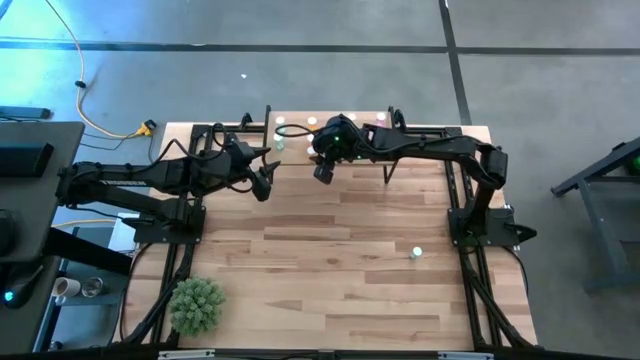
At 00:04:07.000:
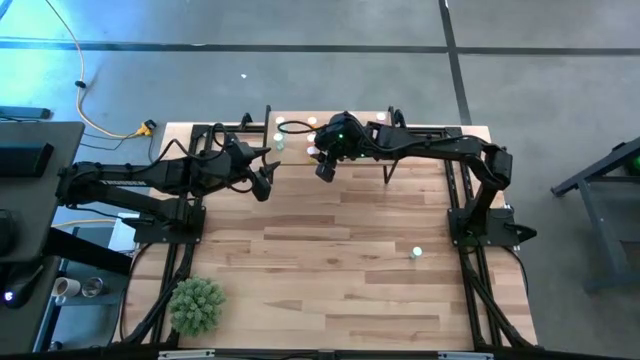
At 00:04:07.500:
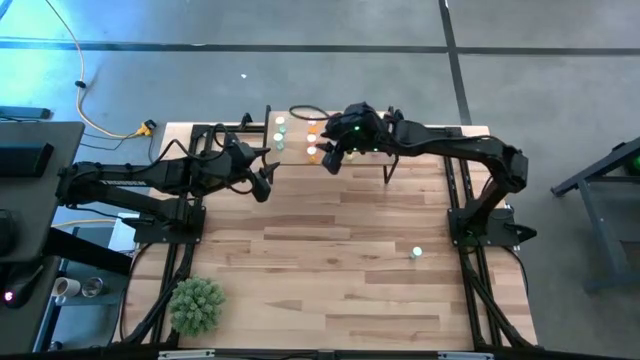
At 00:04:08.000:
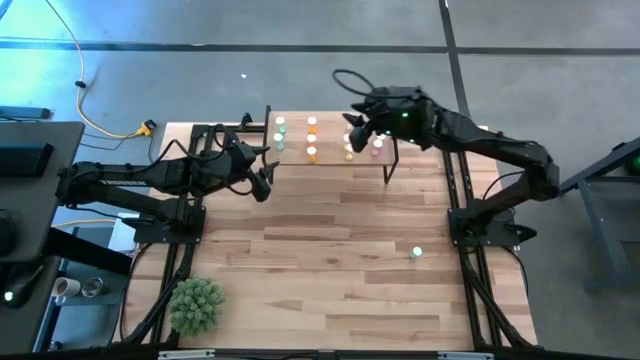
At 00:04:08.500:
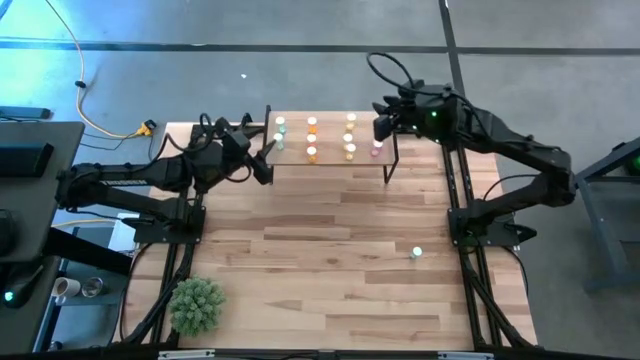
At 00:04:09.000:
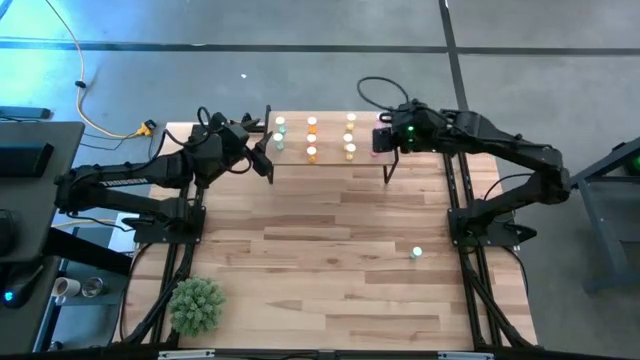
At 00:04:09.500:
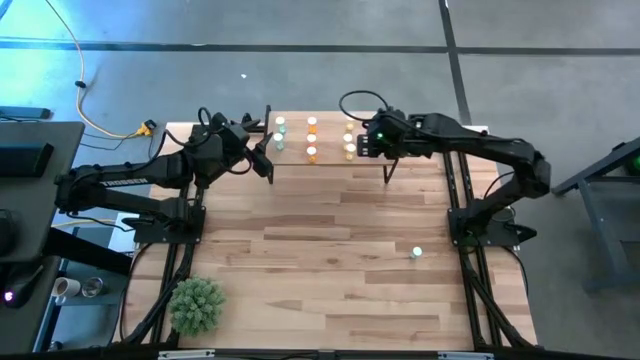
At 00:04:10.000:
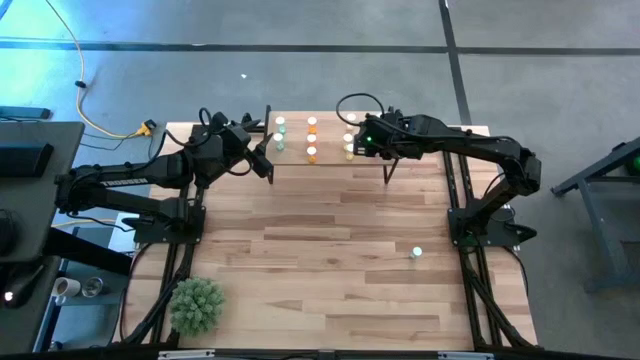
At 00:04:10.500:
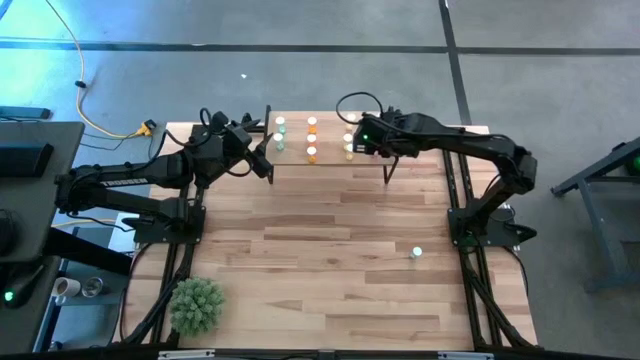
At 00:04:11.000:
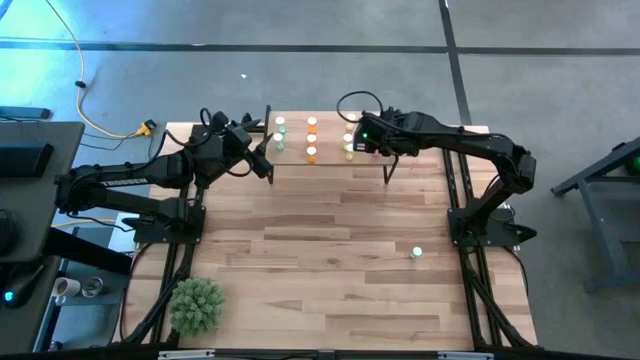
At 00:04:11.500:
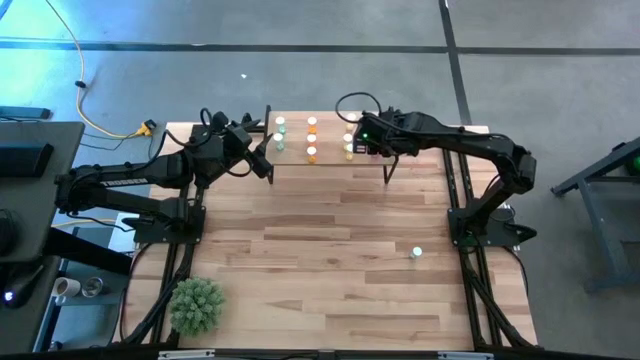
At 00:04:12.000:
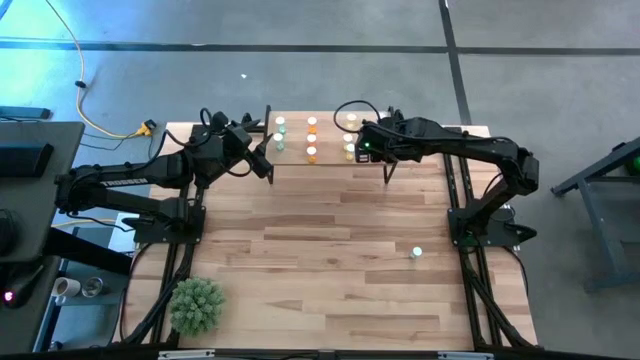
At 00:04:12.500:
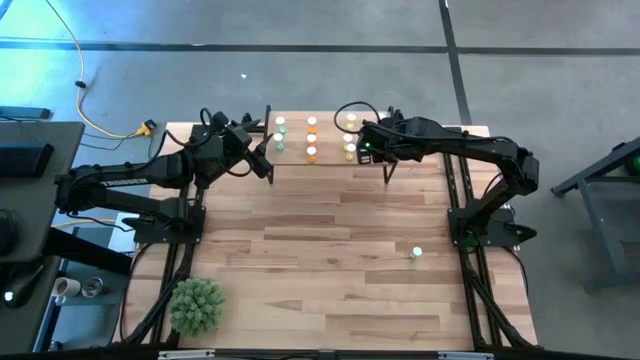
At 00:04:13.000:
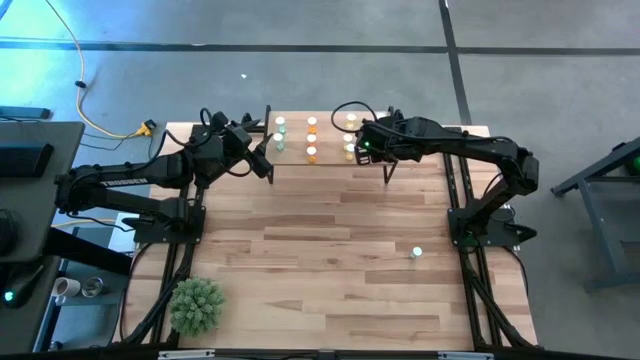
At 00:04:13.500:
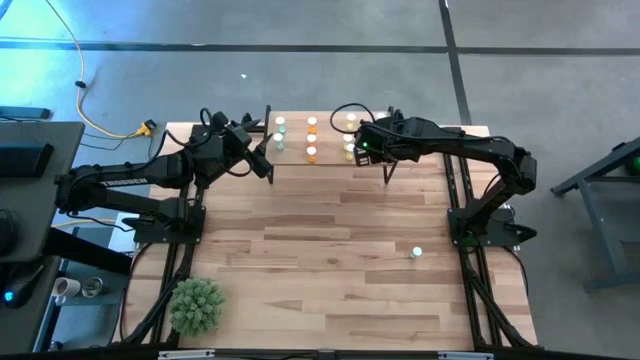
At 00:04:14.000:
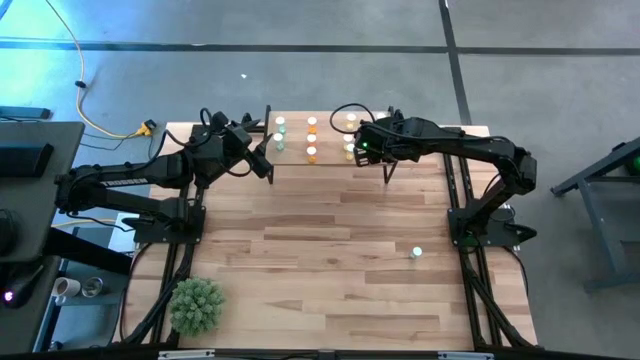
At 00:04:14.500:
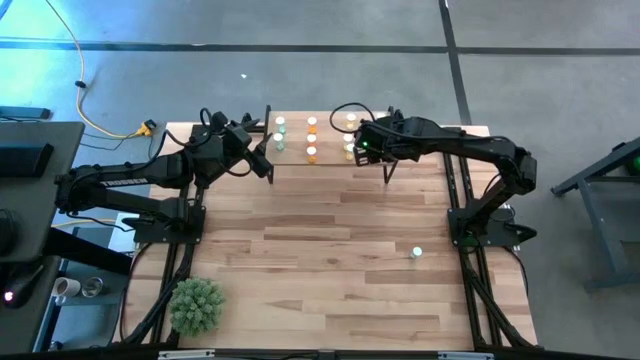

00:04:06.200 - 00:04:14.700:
Task: Pick and place medicine bottles onto shelf by color
Adjust the violet pill bottle on the shelf

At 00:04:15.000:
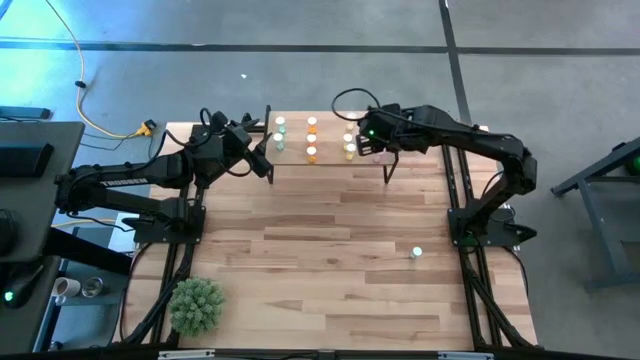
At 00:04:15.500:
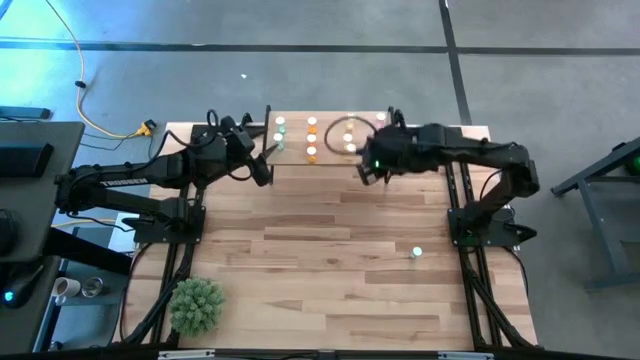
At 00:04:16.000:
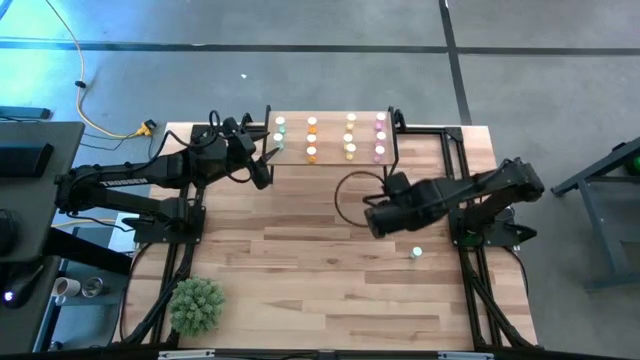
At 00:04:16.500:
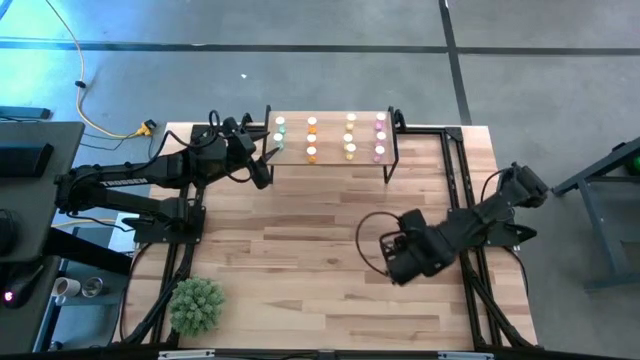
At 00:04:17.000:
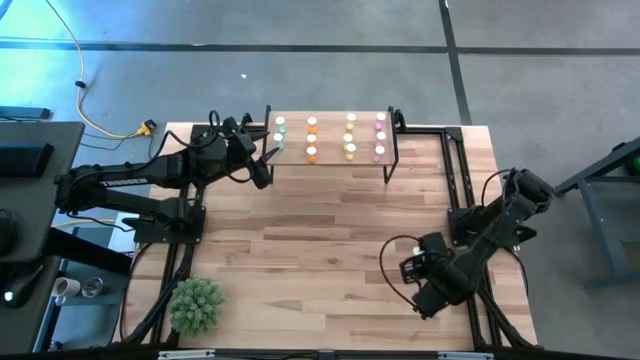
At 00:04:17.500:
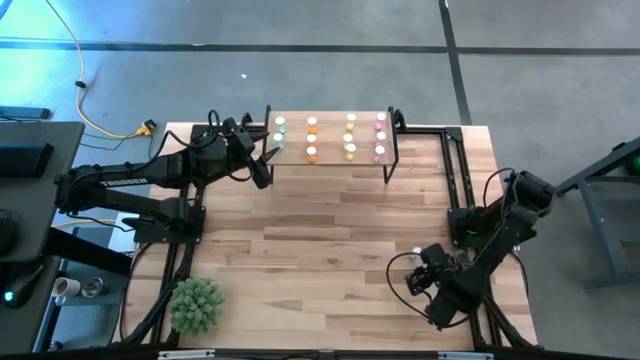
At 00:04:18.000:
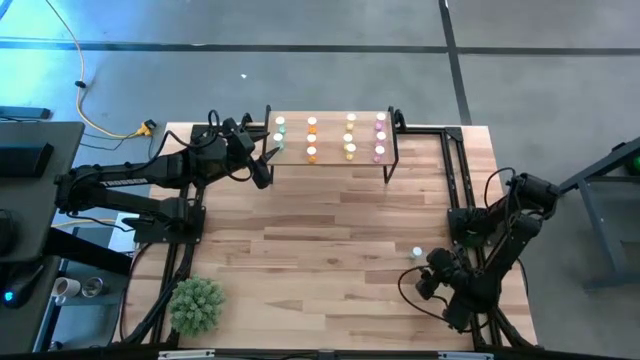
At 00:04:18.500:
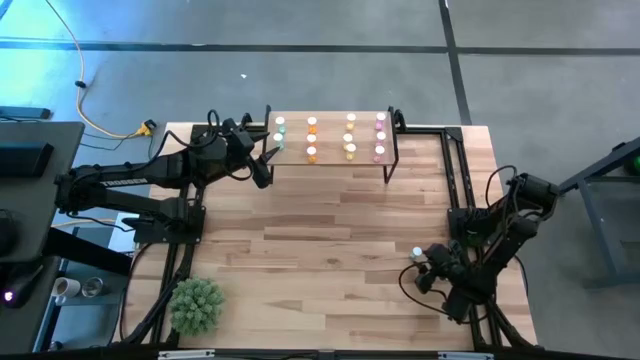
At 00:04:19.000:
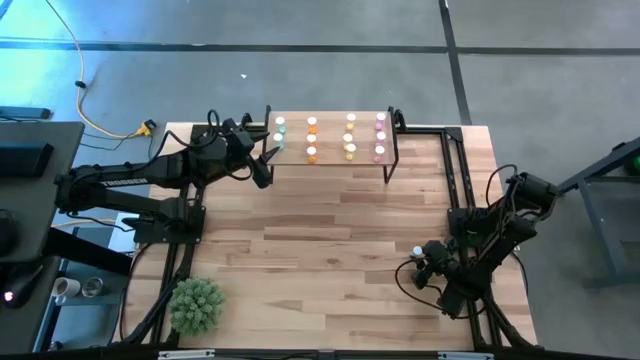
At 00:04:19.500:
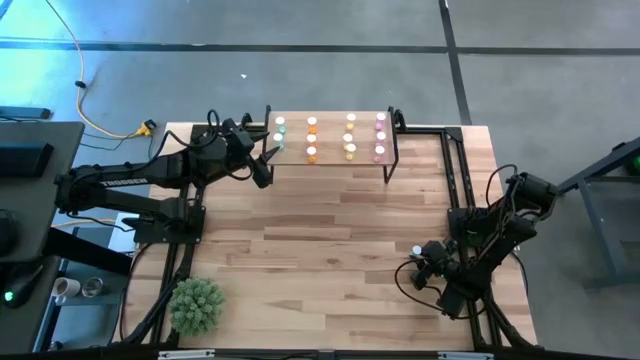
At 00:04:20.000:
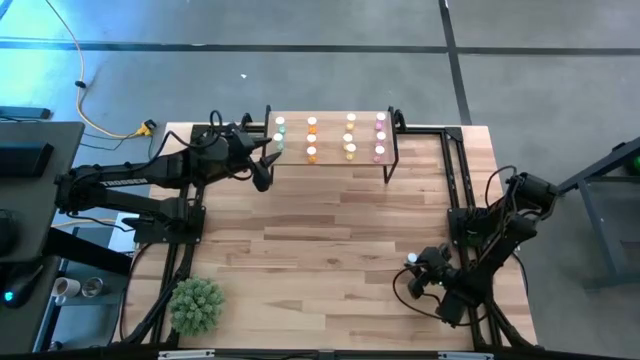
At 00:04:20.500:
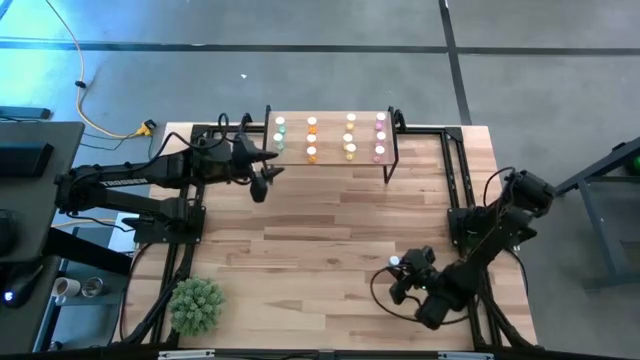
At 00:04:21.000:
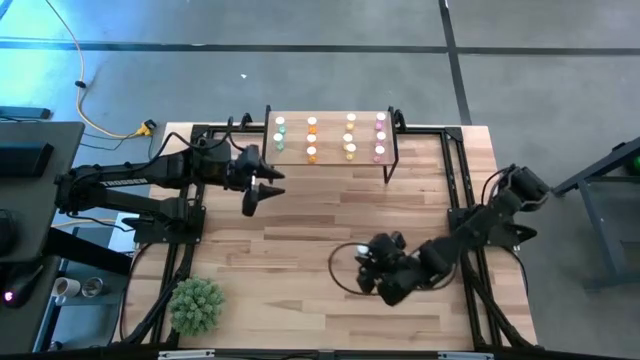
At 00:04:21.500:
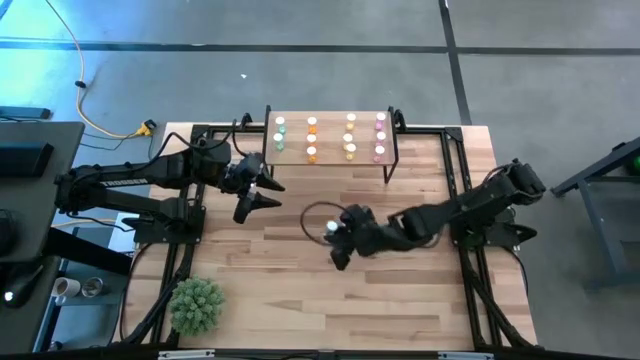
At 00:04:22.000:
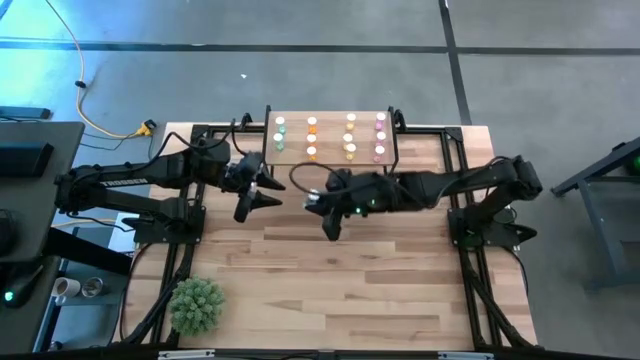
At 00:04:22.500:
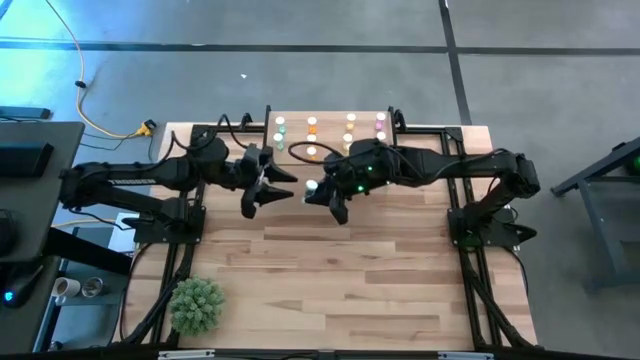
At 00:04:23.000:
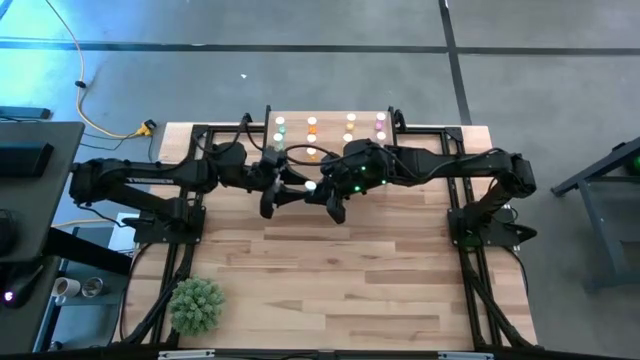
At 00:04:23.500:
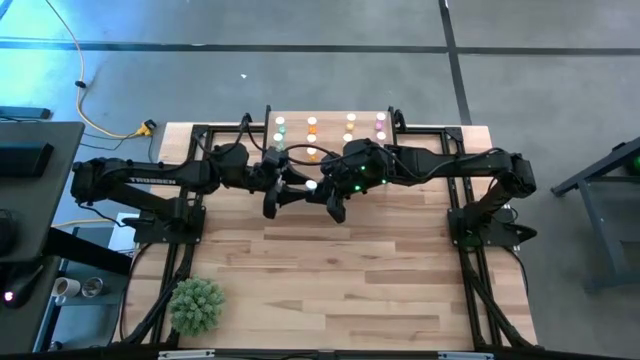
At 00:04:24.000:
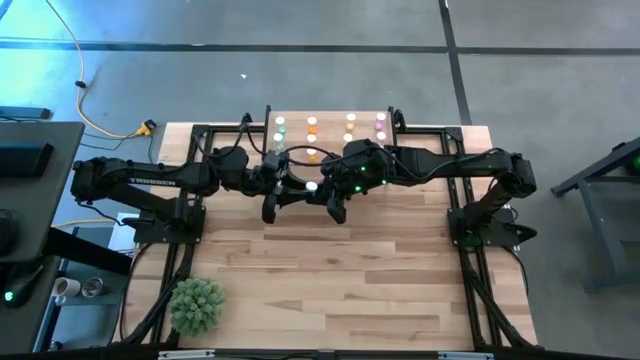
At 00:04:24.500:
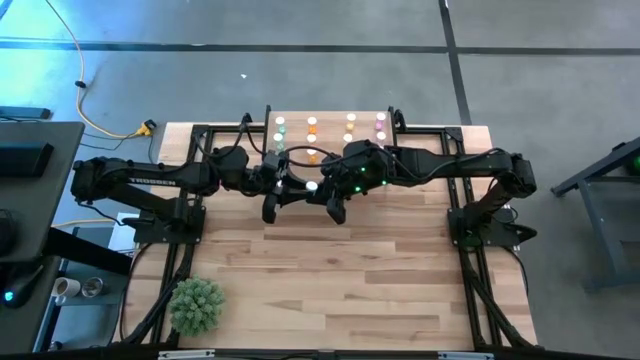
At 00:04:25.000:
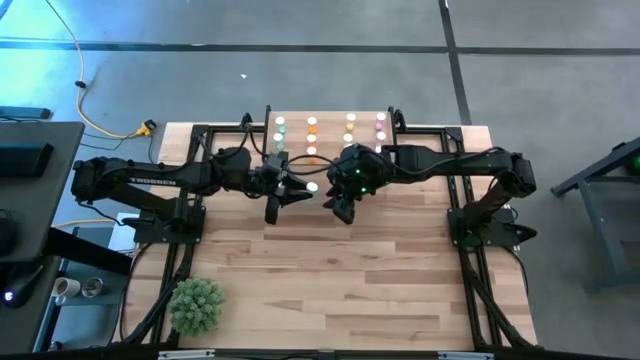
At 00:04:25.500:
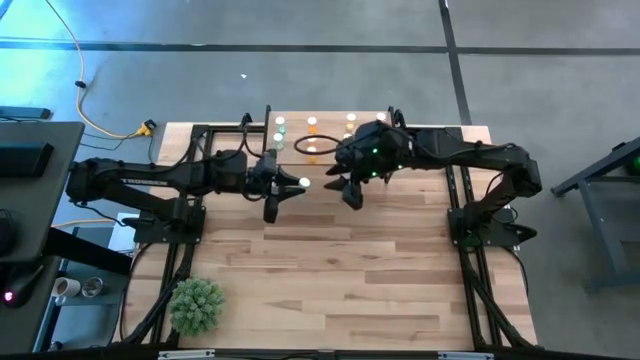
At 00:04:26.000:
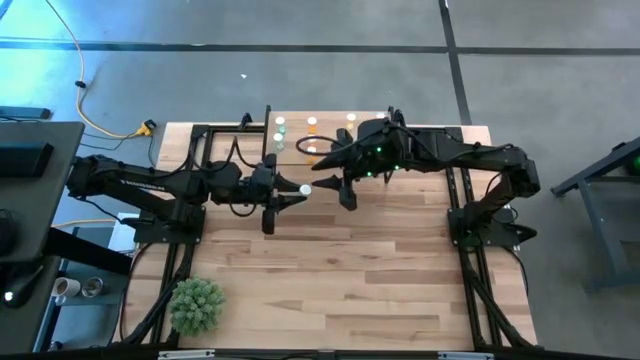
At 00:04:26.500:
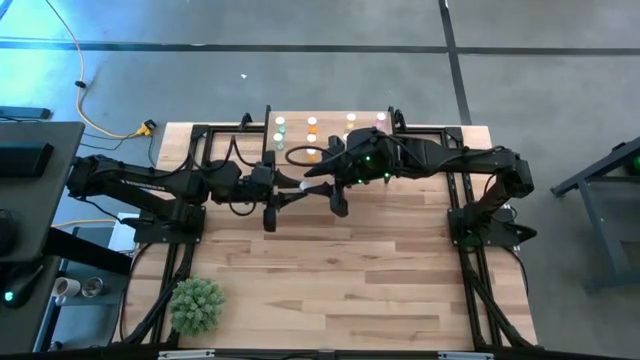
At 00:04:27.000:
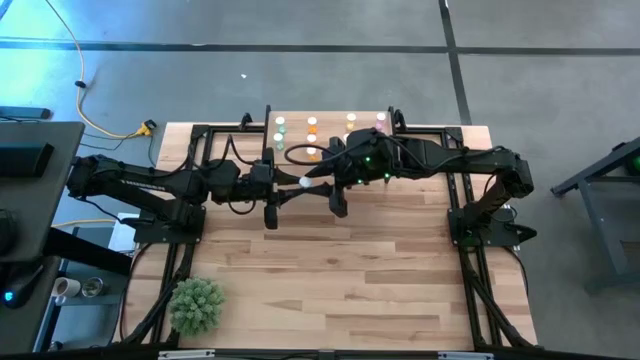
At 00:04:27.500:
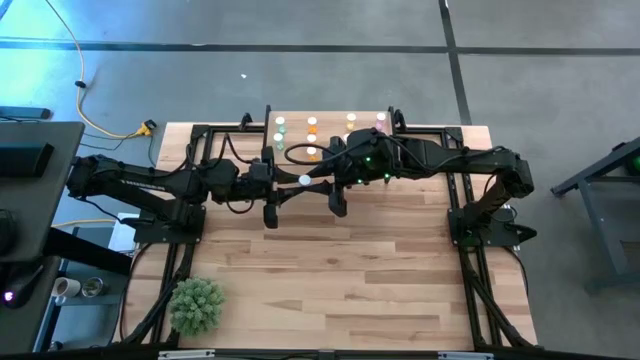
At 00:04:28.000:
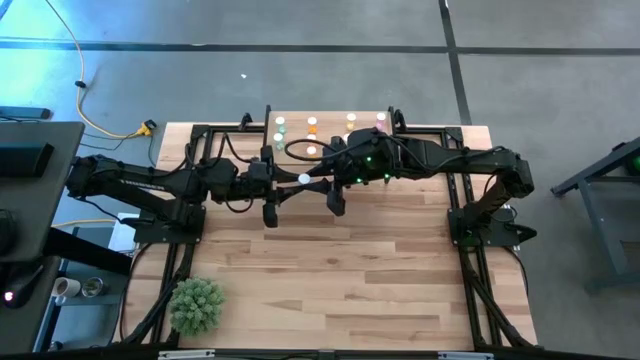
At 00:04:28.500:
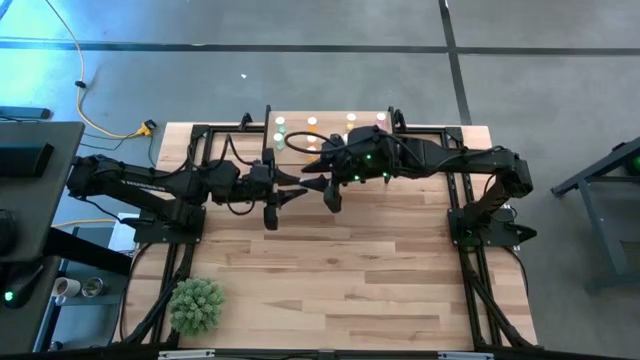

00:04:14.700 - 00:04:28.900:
Put the blue pill bottle on the shelf aligned with the other blue pill bottles
